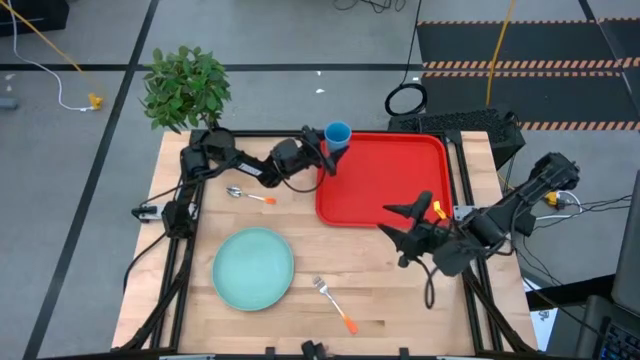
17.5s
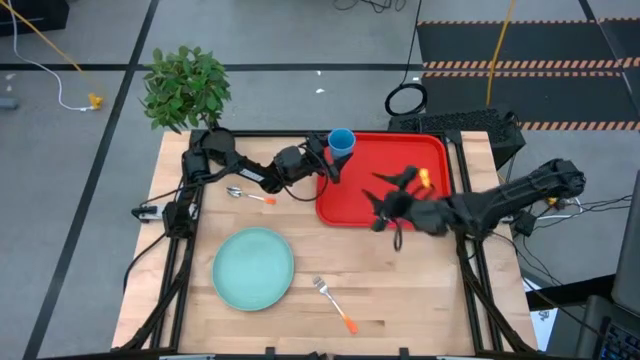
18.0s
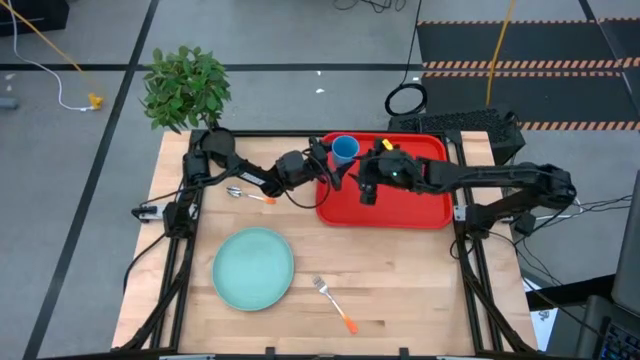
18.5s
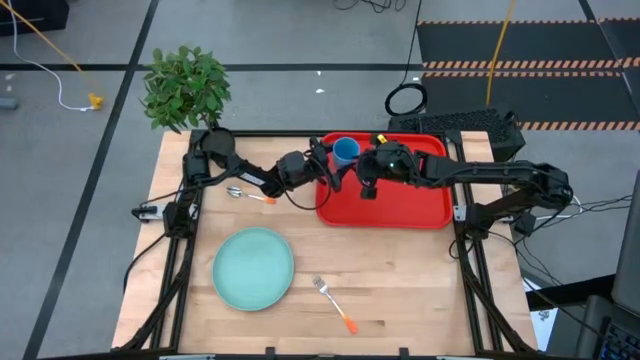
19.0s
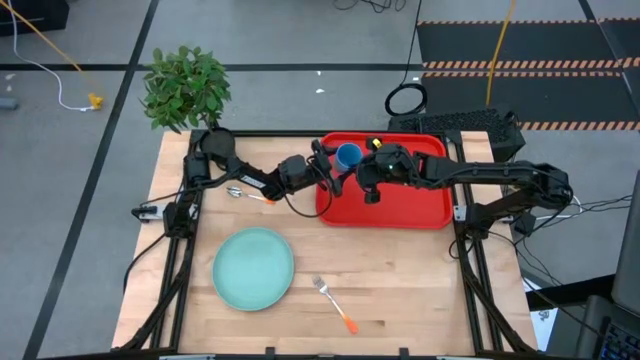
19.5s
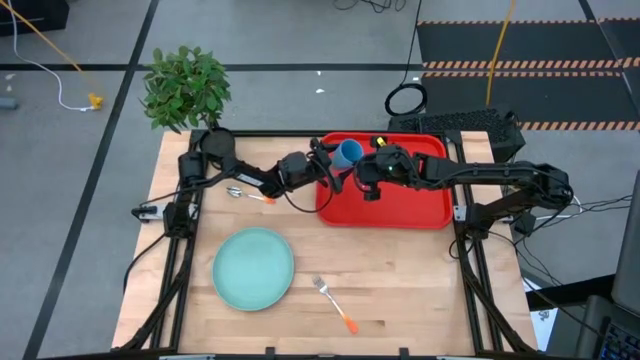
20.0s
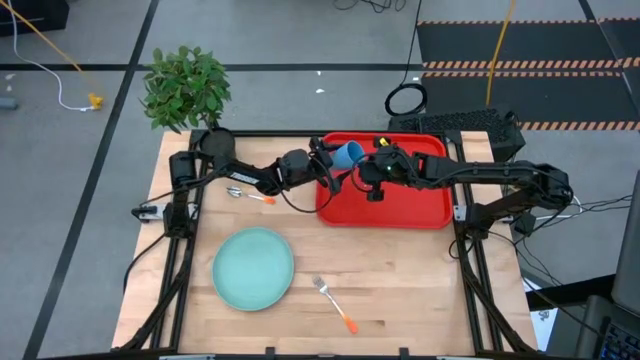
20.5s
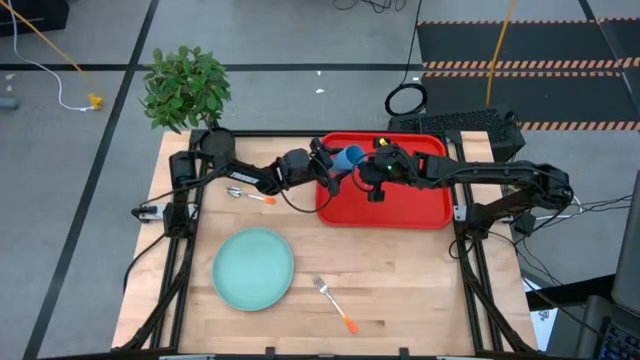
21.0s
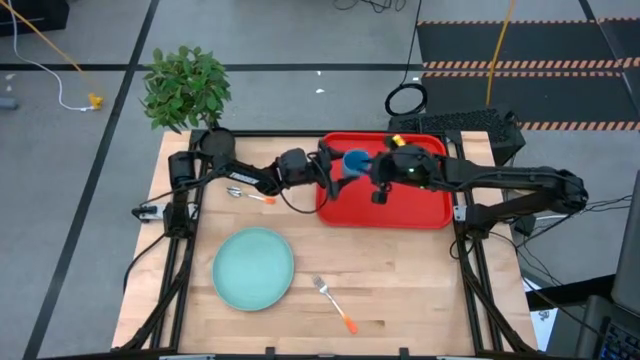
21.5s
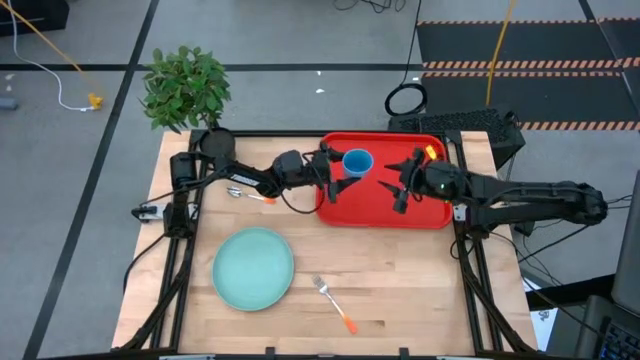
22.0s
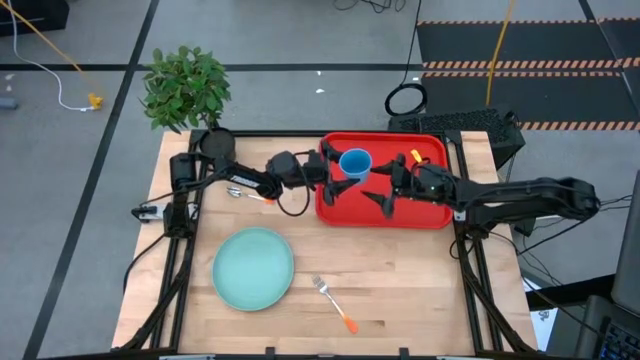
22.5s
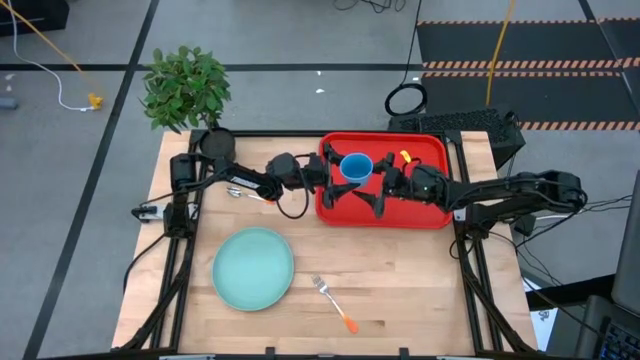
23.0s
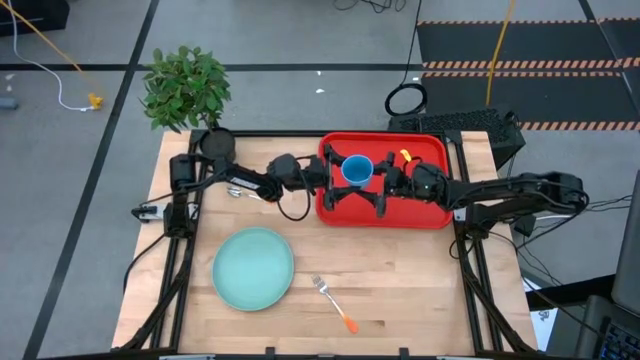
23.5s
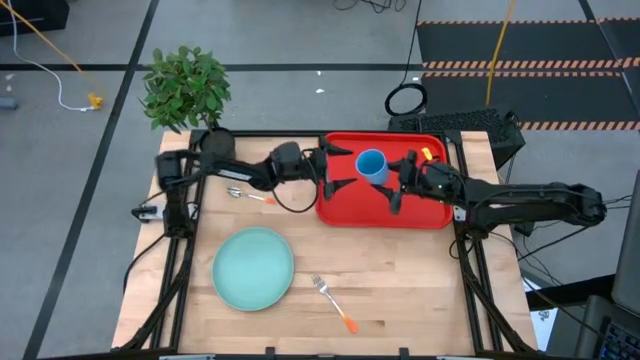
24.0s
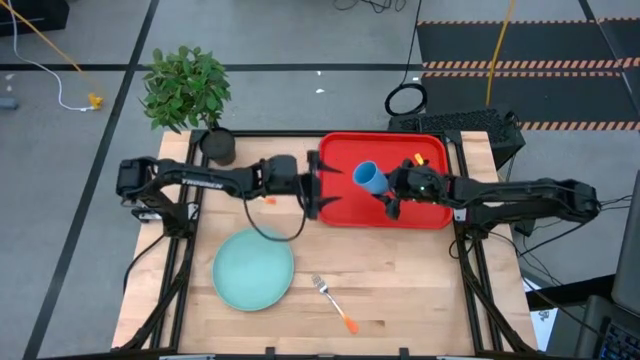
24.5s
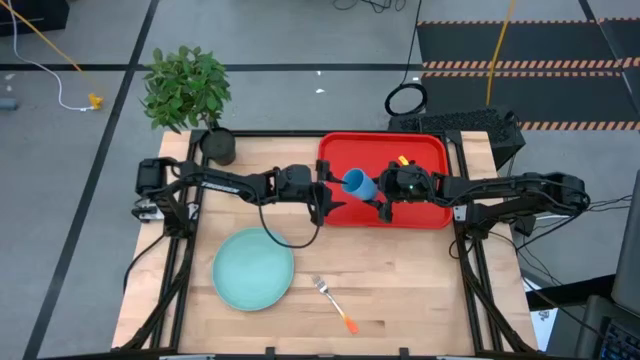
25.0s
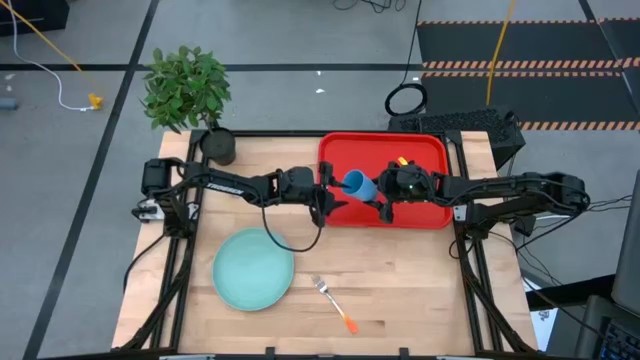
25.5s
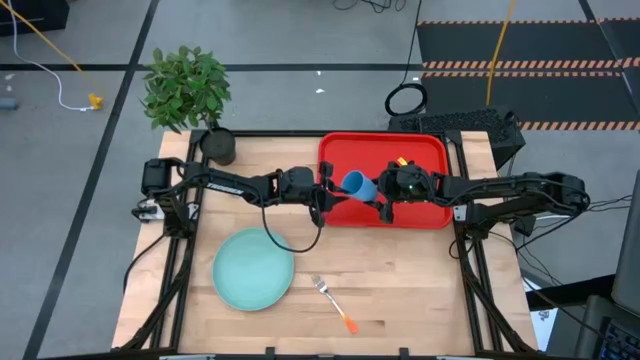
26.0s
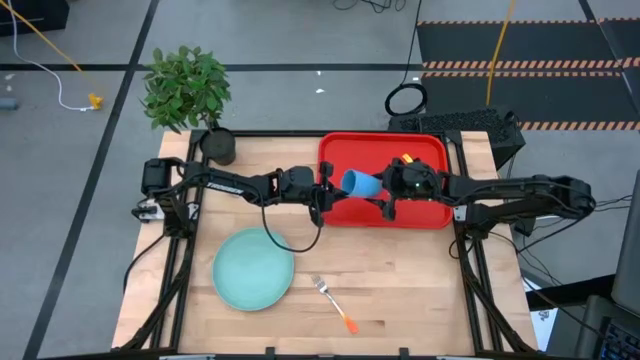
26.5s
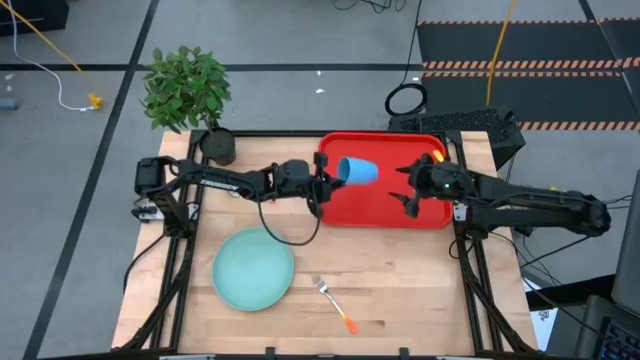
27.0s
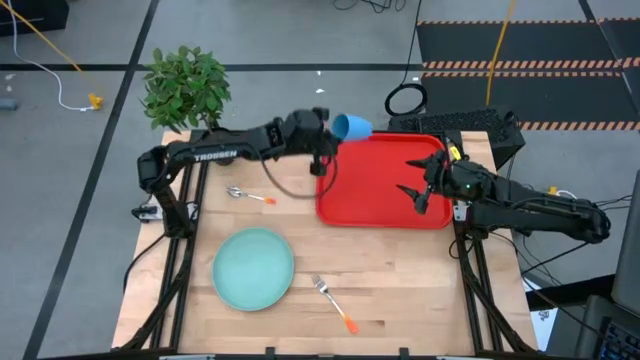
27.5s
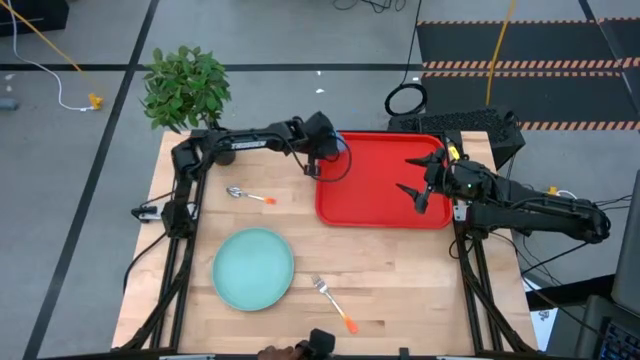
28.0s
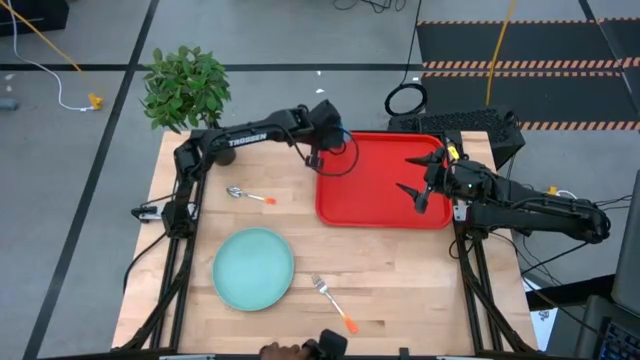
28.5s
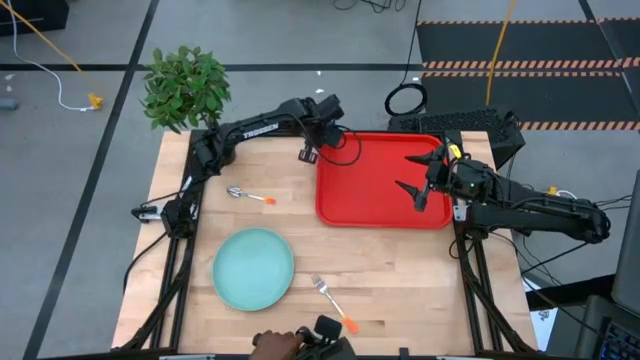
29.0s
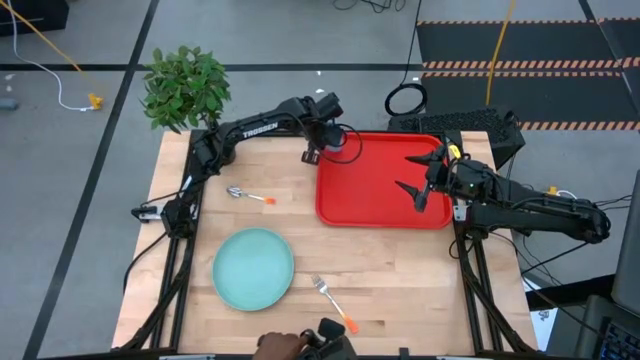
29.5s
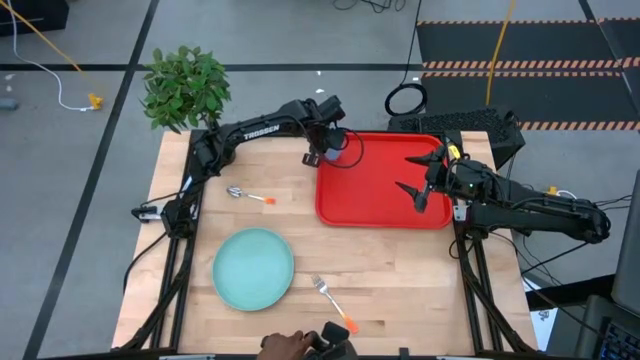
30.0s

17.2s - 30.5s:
Task: Pick and place plate/cup/fork/spoon on tray
Put the blue cup on the red tray

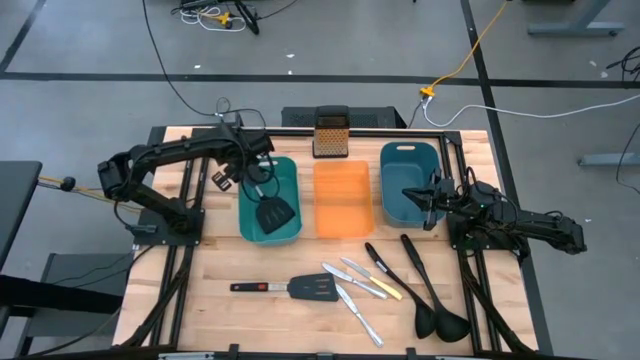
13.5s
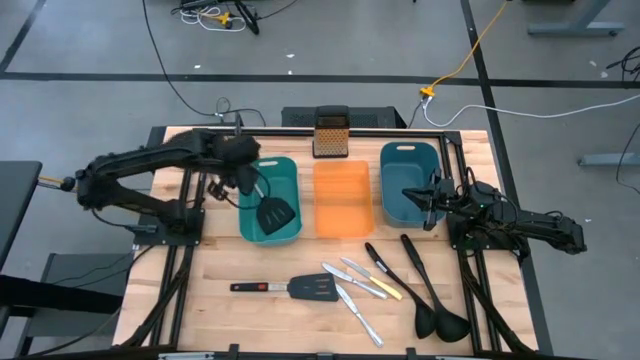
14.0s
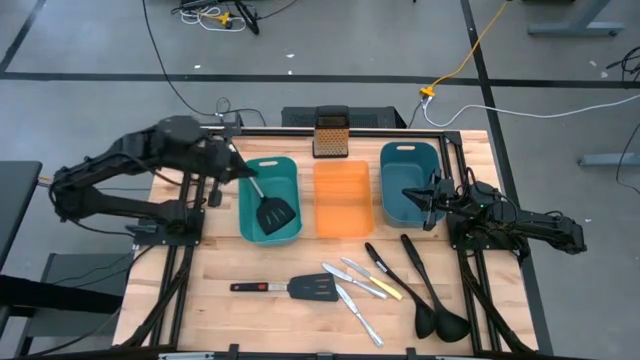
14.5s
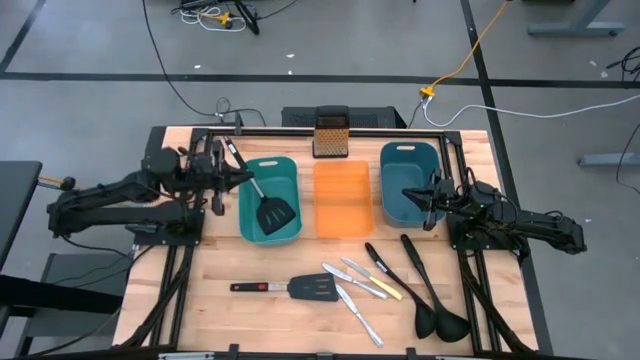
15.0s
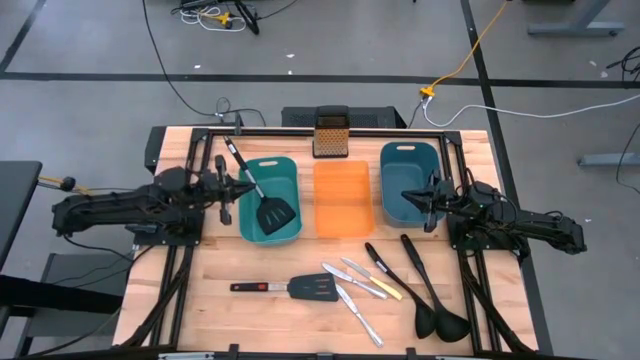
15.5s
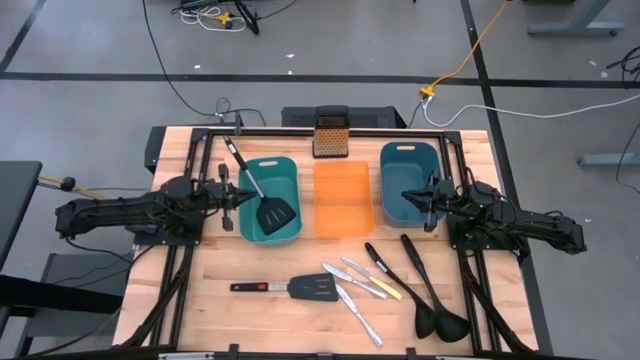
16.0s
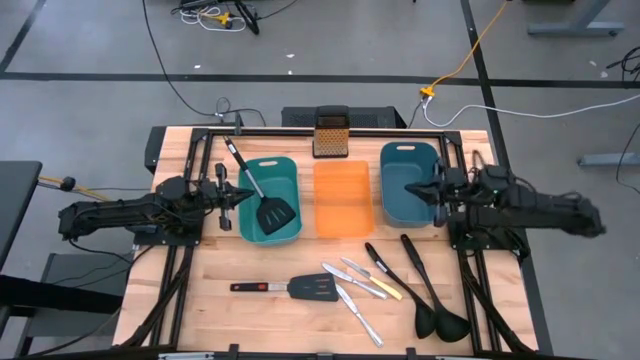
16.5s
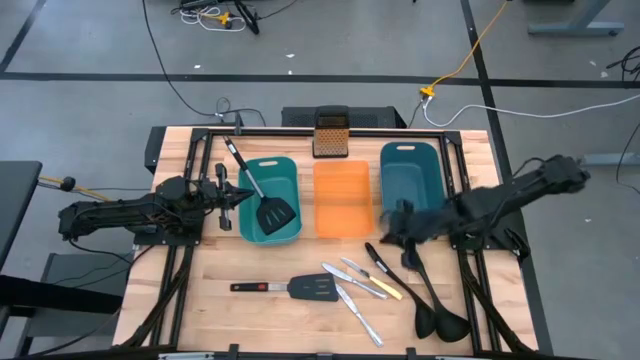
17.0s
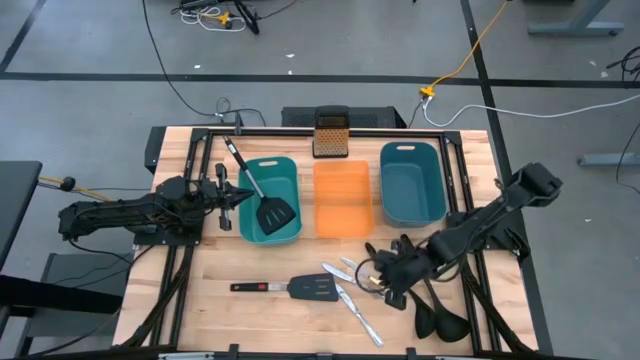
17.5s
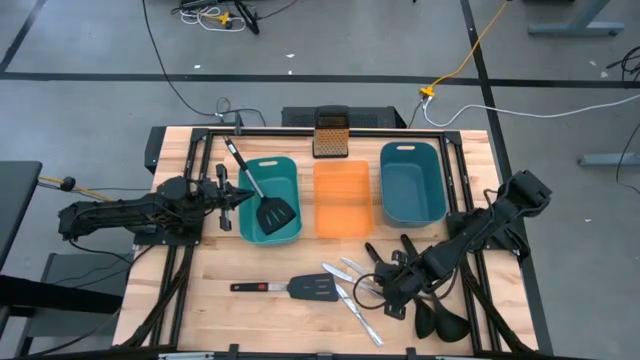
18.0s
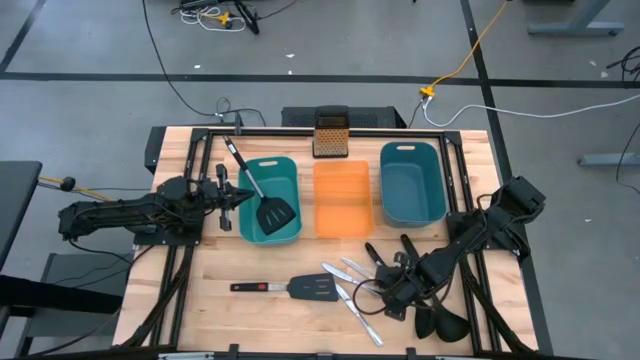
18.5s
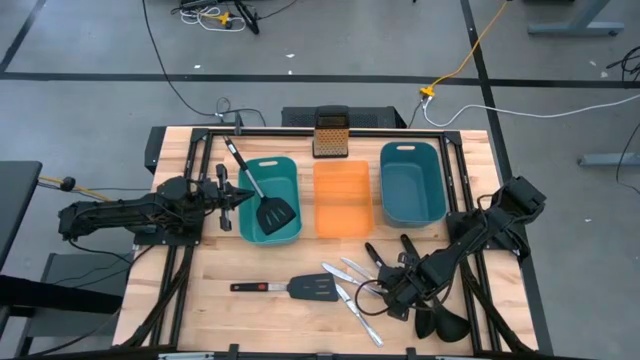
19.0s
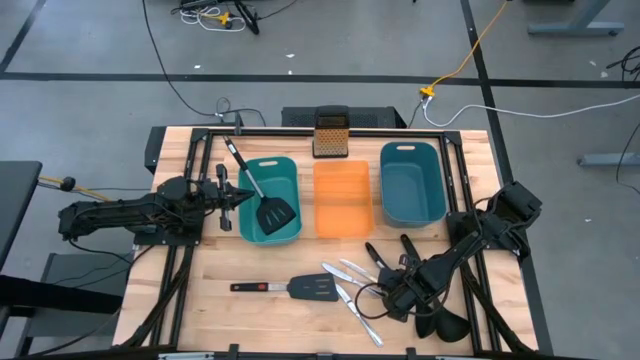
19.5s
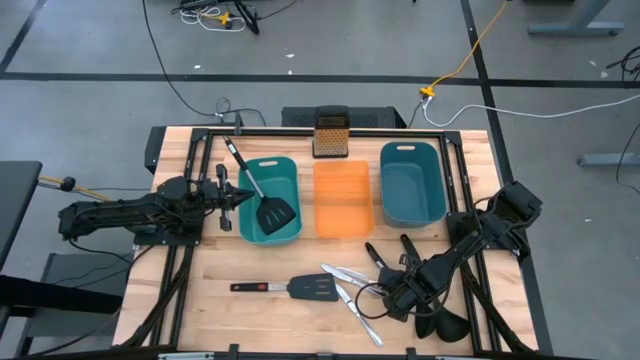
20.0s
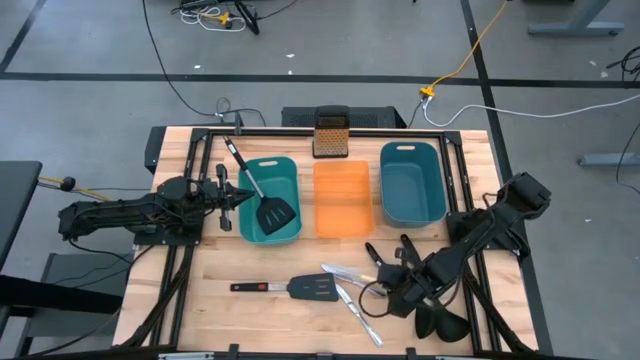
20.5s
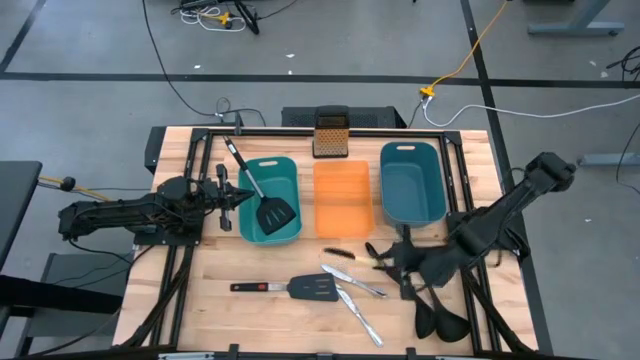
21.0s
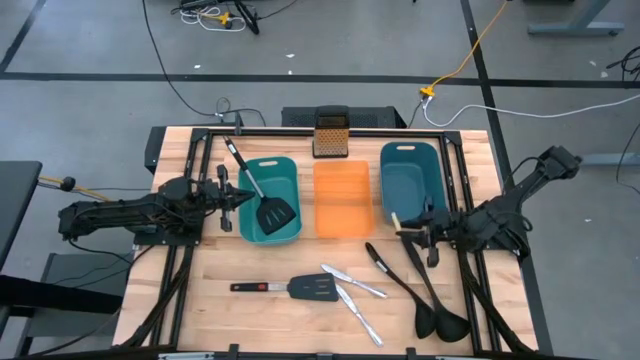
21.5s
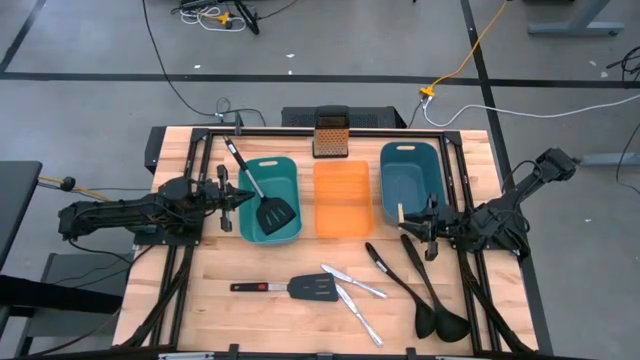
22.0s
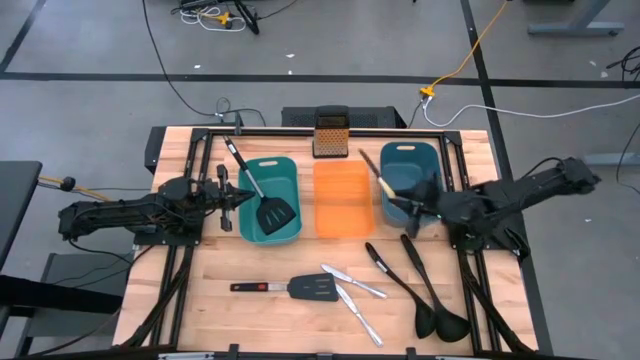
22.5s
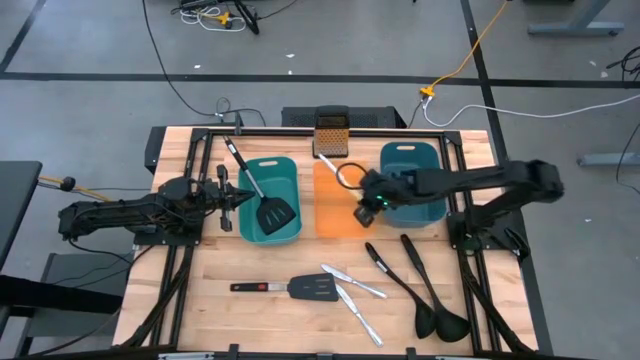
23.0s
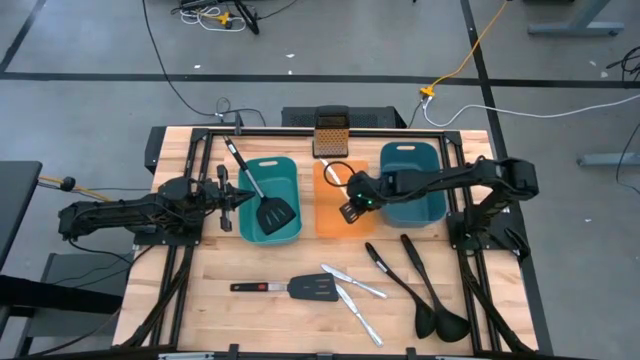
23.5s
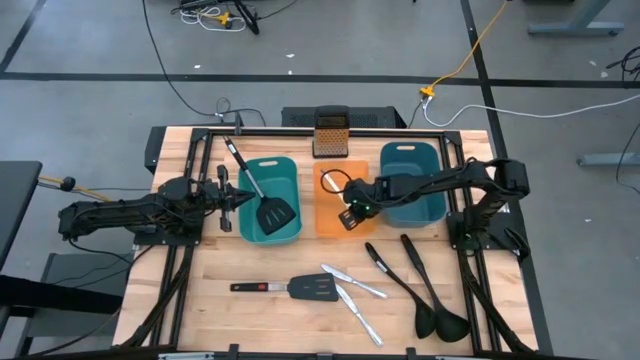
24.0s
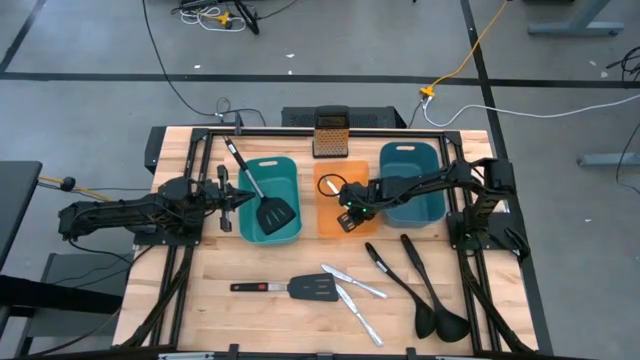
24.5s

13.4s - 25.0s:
Task: Pick & Place Kitchen Items
Put the yellow table knife into the orange bin
